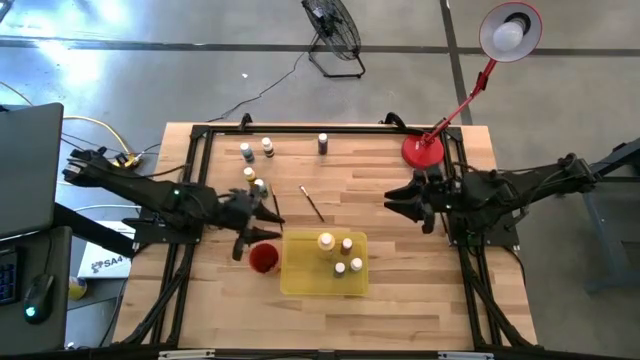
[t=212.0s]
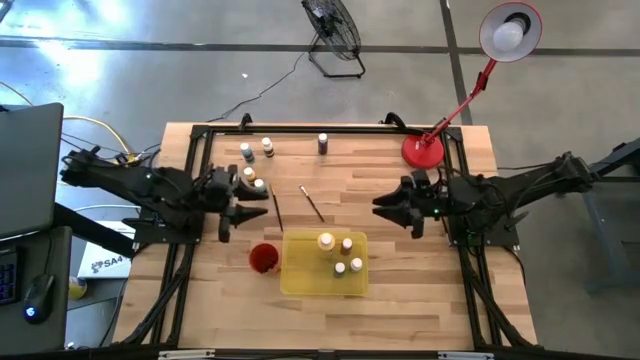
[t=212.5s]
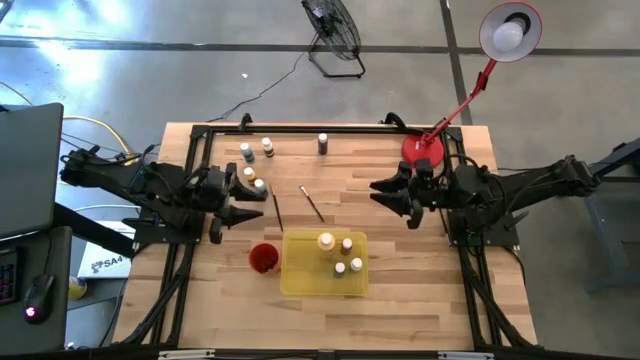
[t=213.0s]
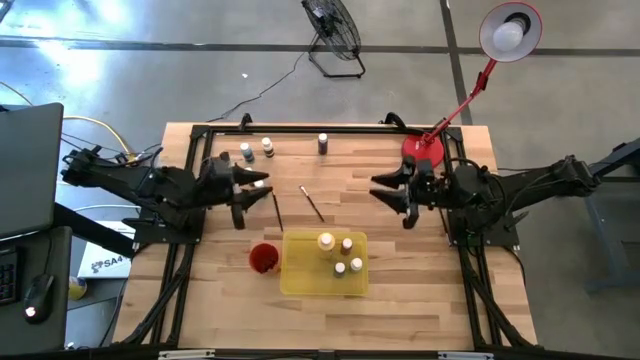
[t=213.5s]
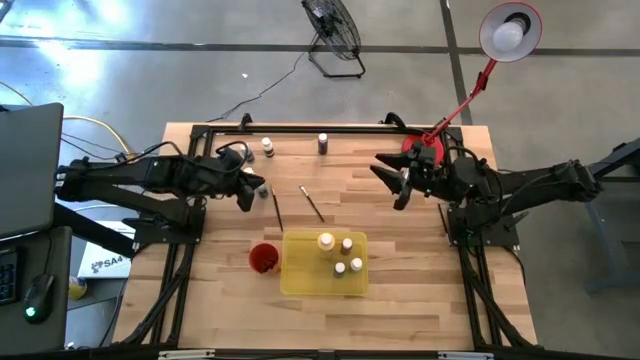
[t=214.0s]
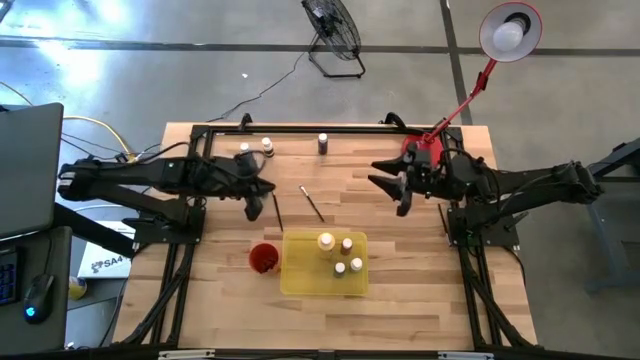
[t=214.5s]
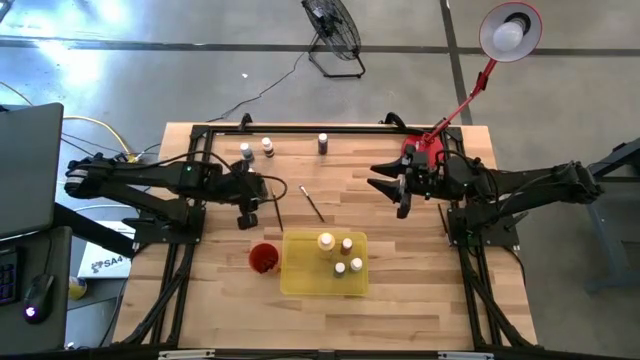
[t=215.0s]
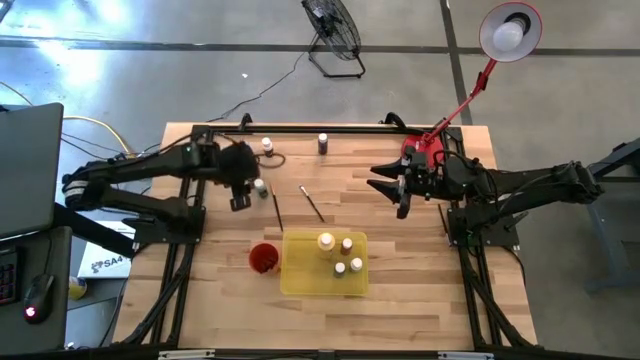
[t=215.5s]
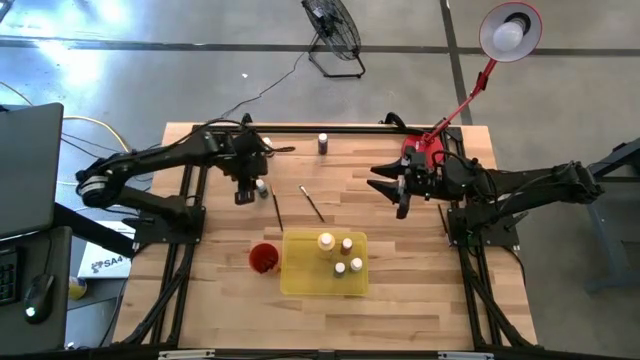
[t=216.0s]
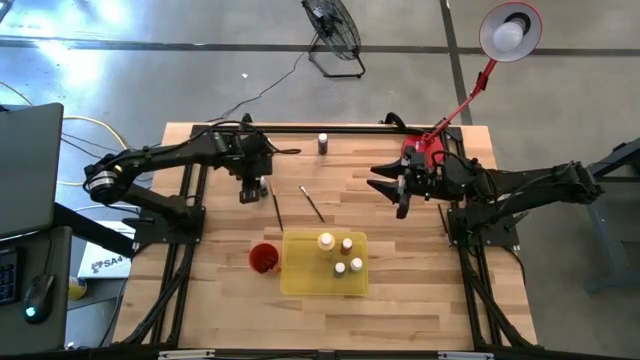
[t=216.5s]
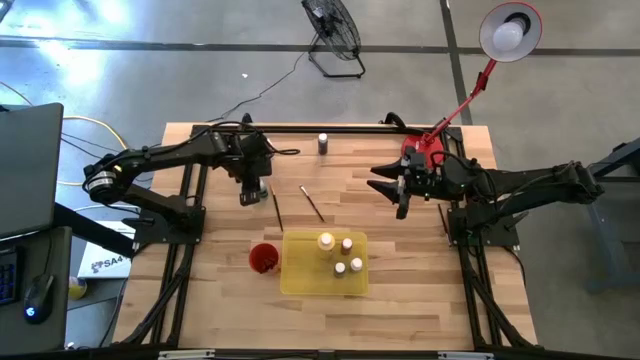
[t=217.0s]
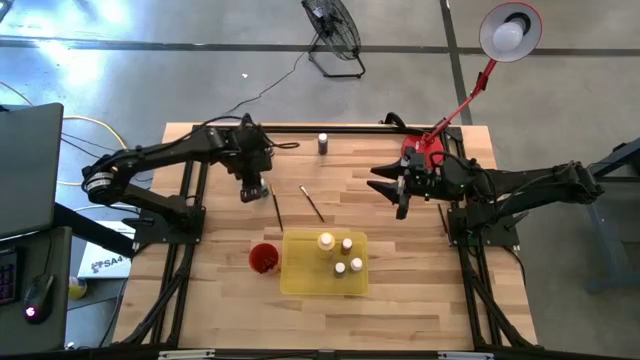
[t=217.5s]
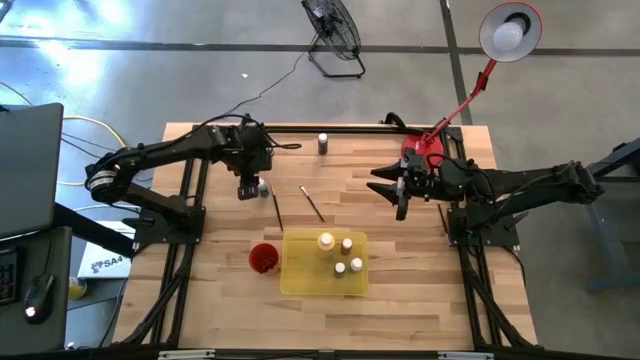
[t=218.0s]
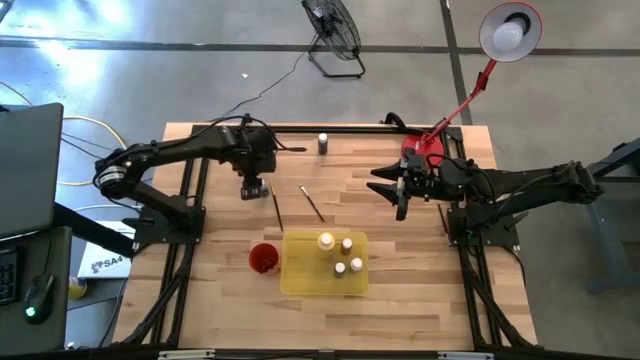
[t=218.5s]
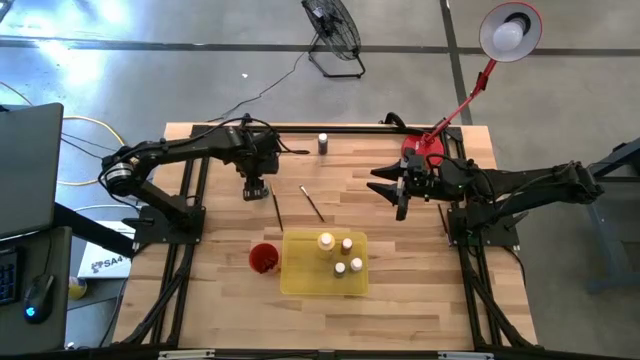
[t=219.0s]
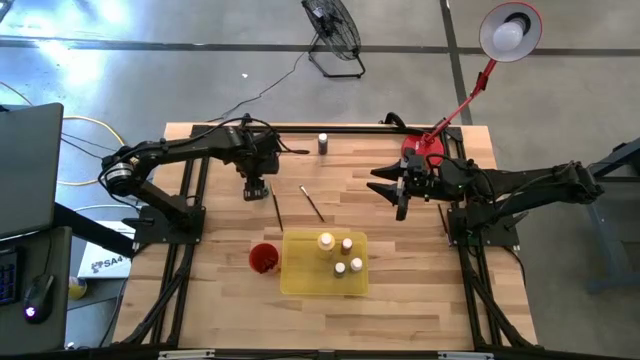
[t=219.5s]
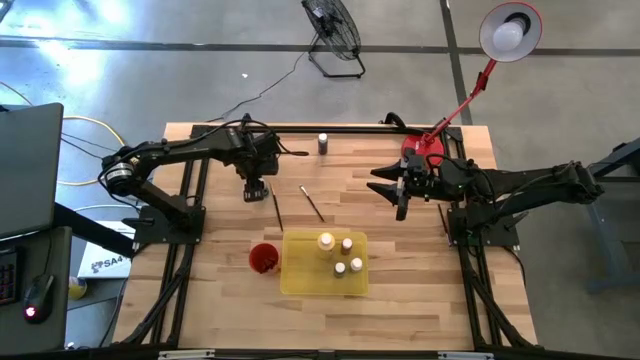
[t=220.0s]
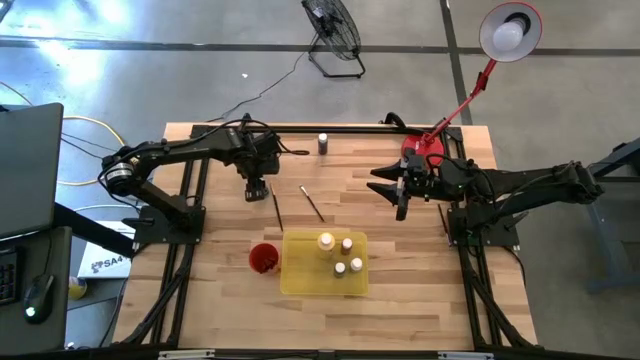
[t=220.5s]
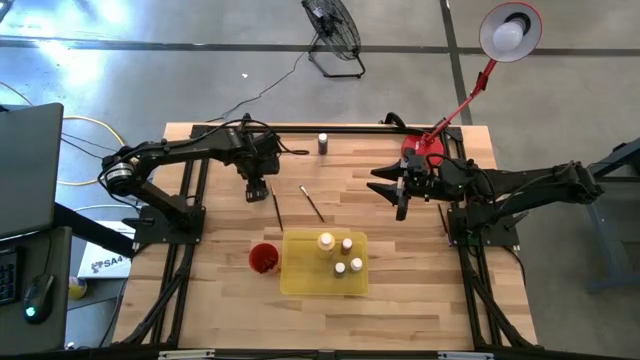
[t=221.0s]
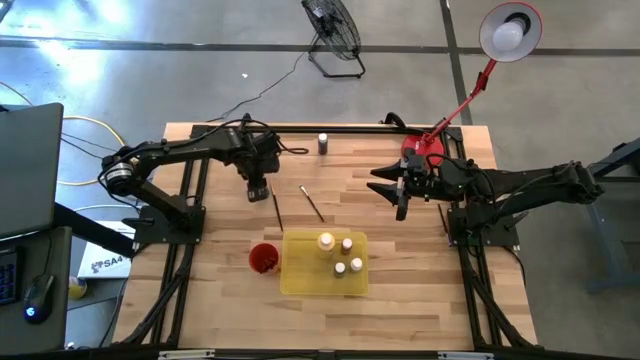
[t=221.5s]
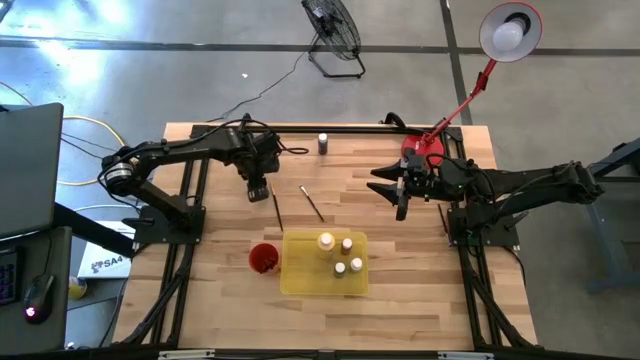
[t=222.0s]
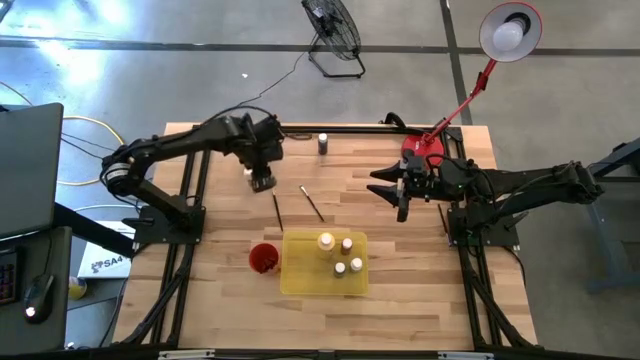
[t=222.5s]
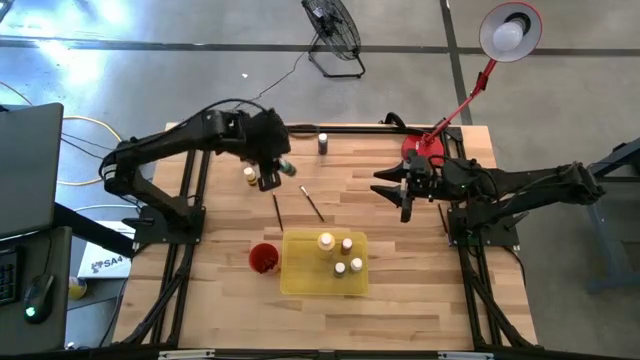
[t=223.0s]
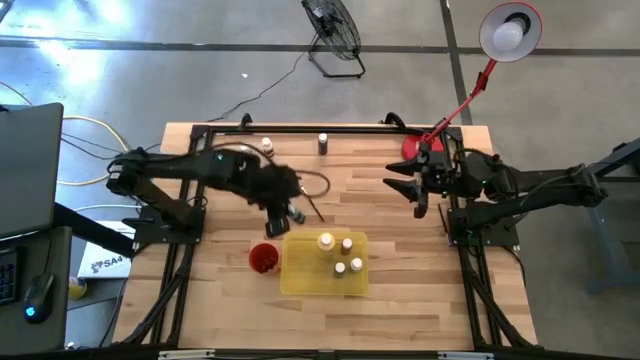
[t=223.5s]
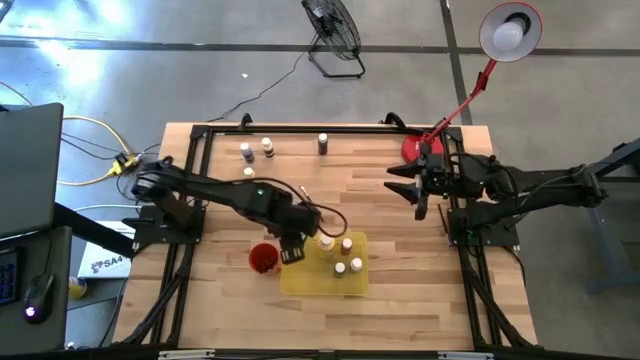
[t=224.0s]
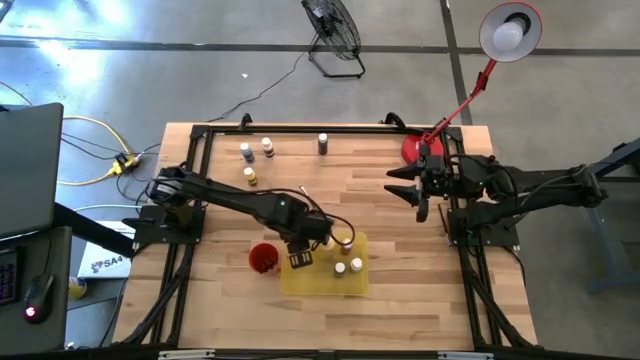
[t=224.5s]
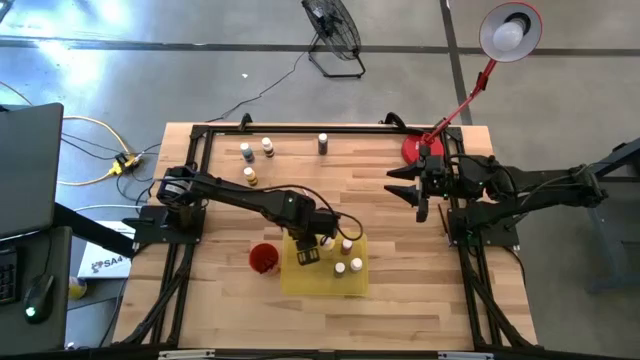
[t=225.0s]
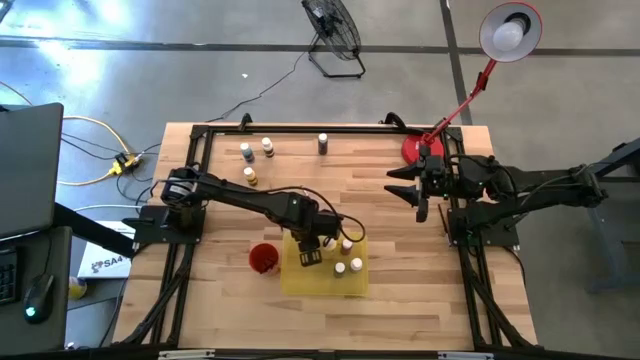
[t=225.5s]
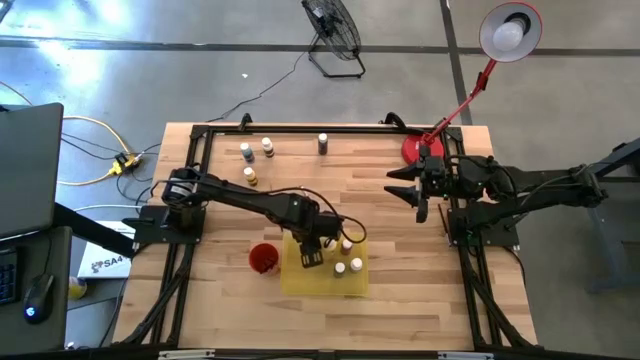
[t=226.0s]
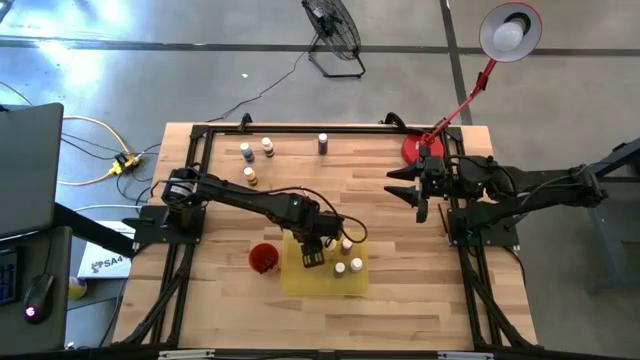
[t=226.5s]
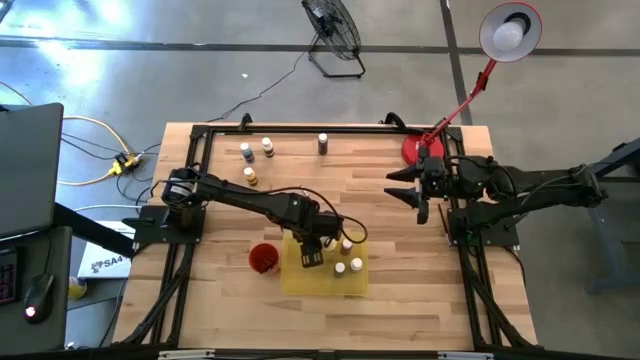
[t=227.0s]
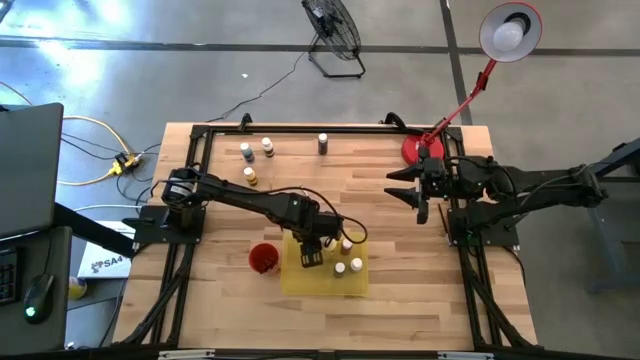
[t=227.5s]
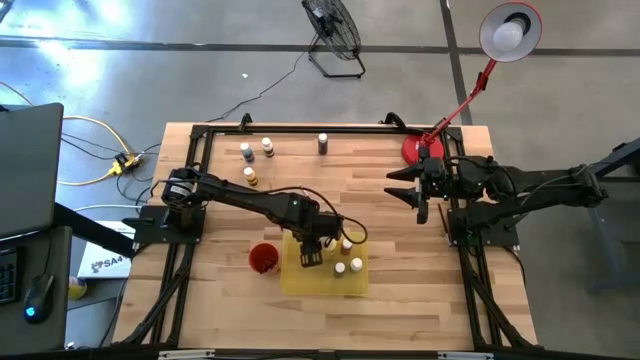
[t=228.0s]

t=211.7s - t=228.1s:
Task: Pick & Place Paint Supplies
Put the blue paint bottle into the yellow bin
